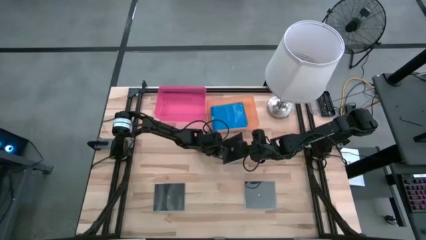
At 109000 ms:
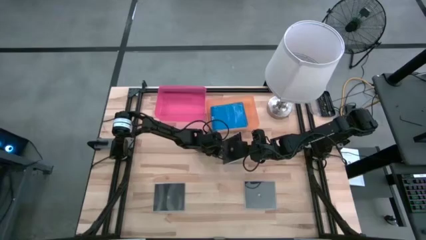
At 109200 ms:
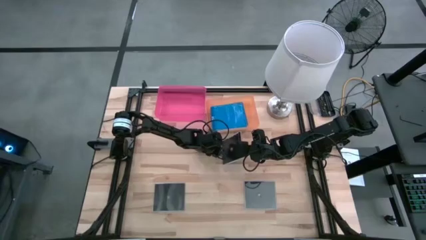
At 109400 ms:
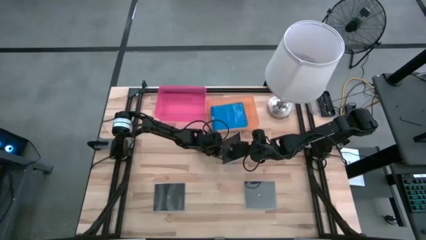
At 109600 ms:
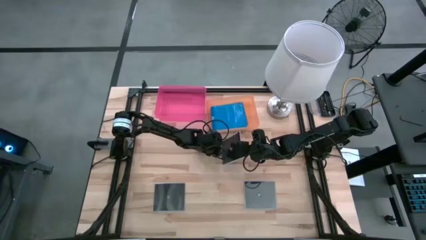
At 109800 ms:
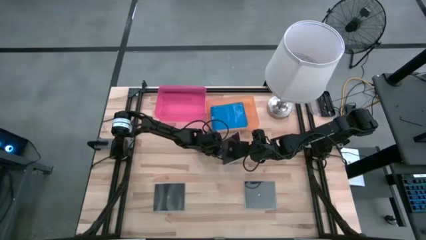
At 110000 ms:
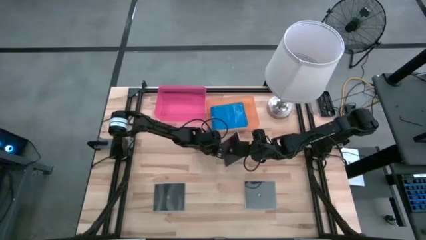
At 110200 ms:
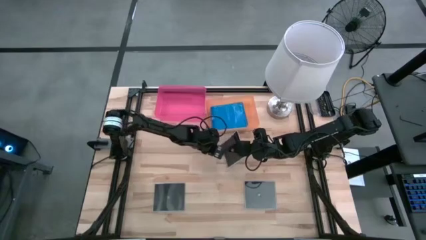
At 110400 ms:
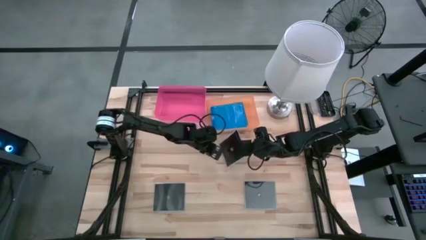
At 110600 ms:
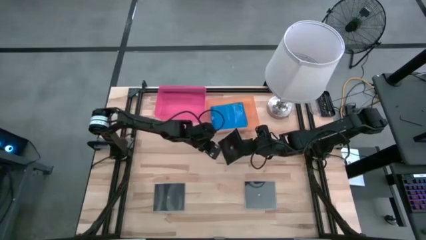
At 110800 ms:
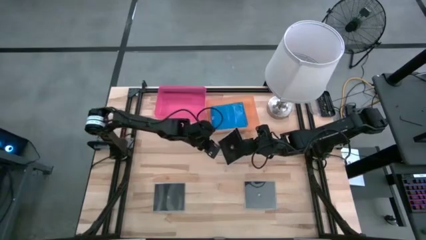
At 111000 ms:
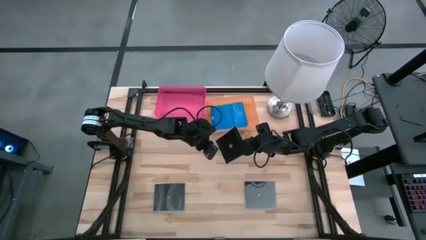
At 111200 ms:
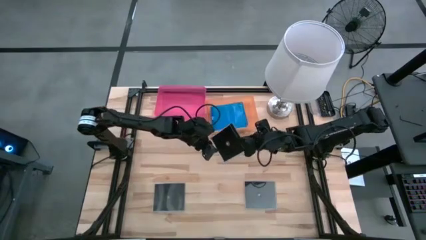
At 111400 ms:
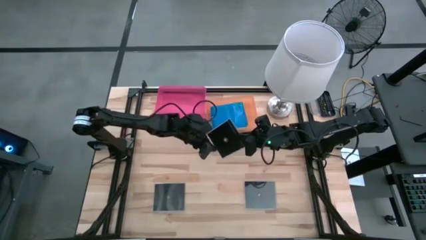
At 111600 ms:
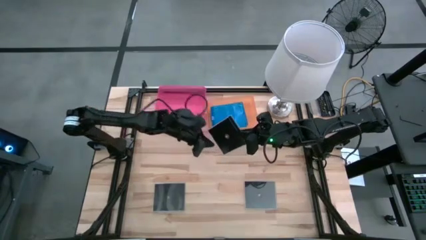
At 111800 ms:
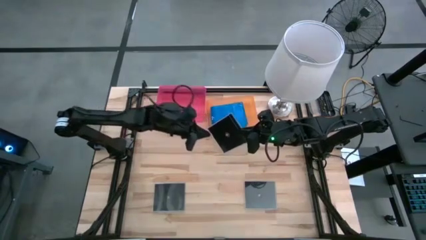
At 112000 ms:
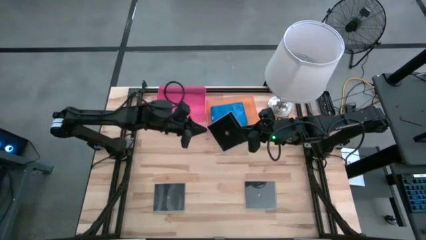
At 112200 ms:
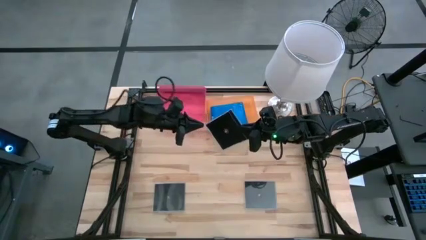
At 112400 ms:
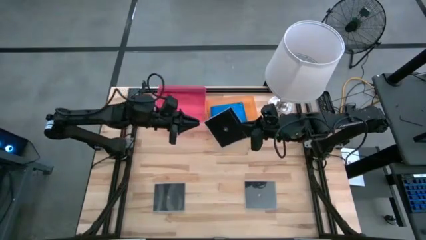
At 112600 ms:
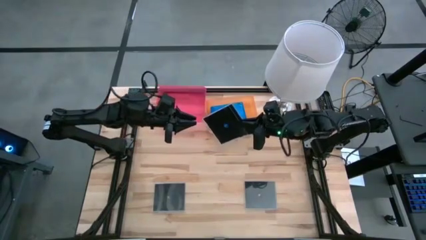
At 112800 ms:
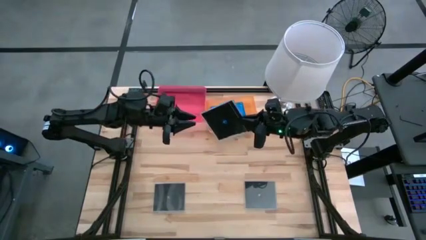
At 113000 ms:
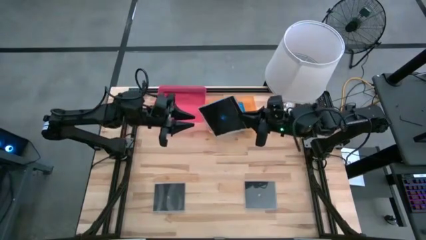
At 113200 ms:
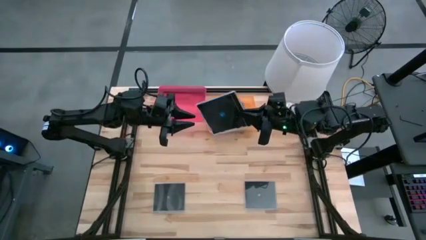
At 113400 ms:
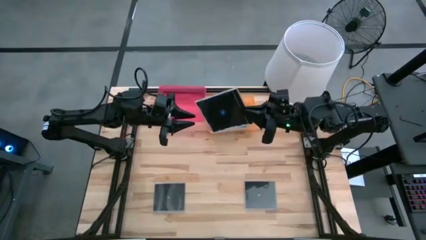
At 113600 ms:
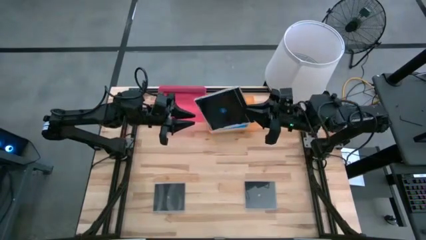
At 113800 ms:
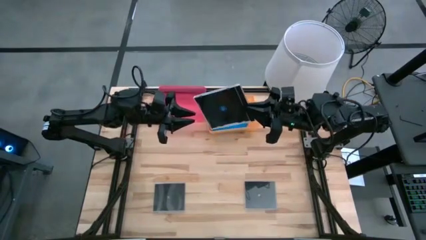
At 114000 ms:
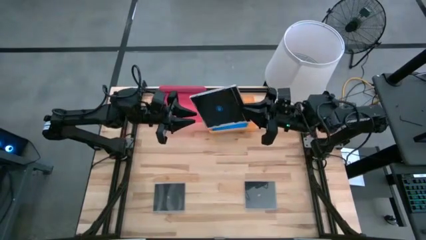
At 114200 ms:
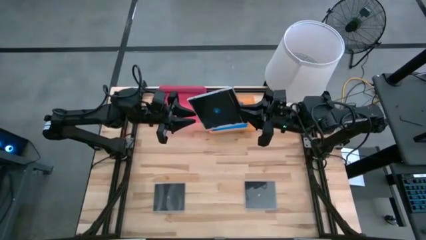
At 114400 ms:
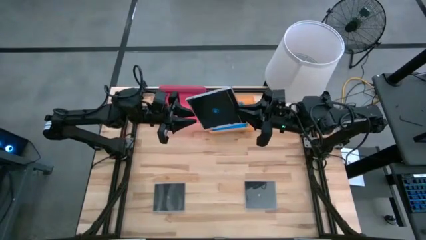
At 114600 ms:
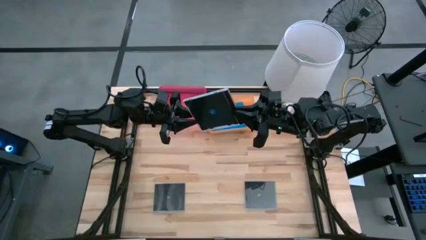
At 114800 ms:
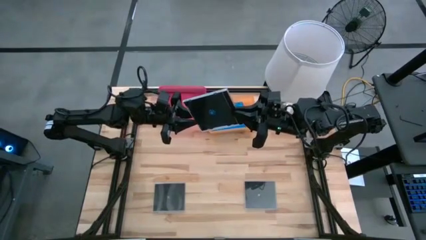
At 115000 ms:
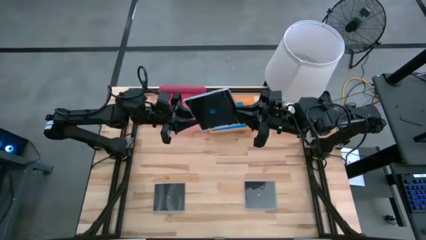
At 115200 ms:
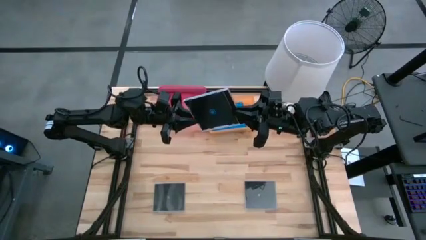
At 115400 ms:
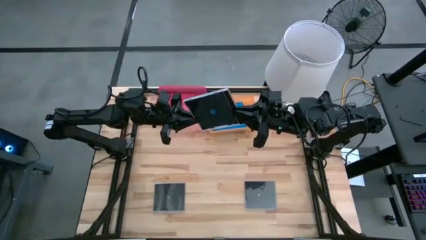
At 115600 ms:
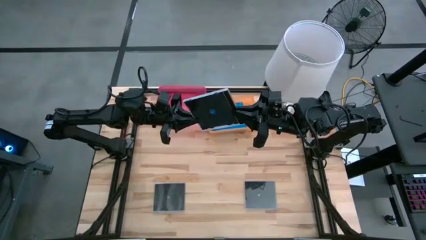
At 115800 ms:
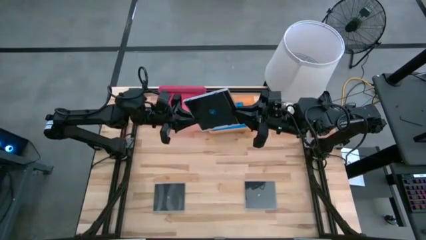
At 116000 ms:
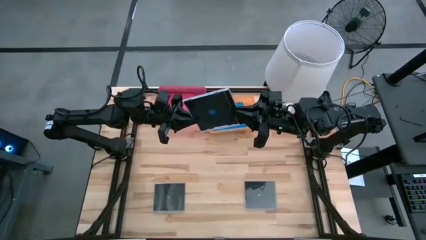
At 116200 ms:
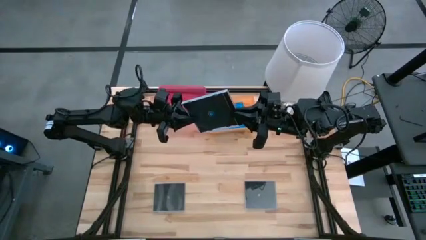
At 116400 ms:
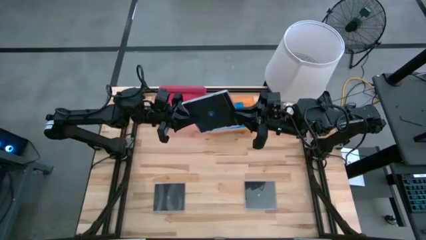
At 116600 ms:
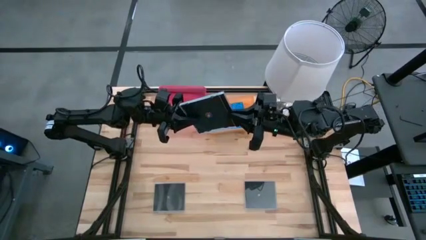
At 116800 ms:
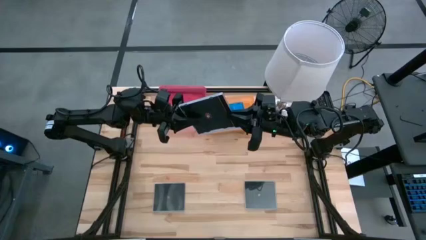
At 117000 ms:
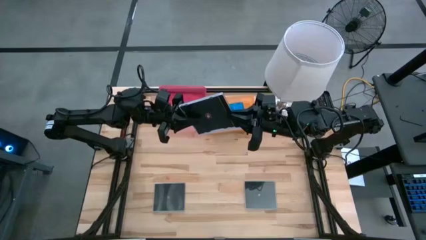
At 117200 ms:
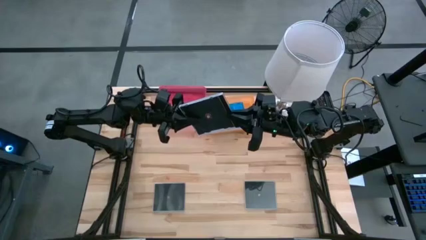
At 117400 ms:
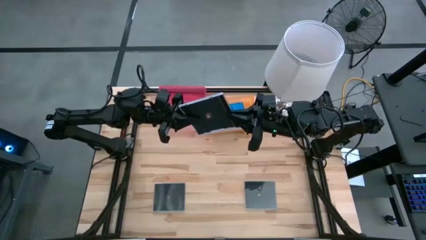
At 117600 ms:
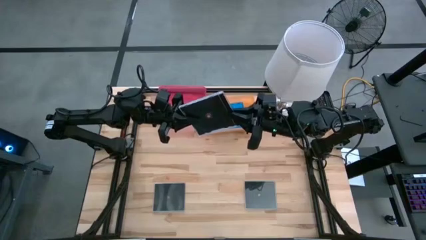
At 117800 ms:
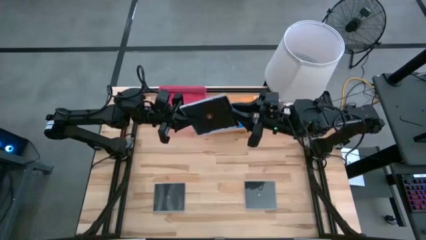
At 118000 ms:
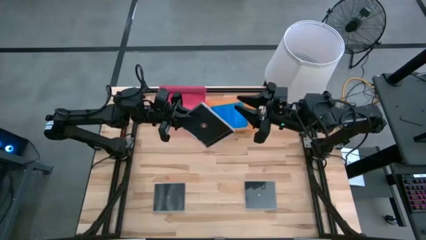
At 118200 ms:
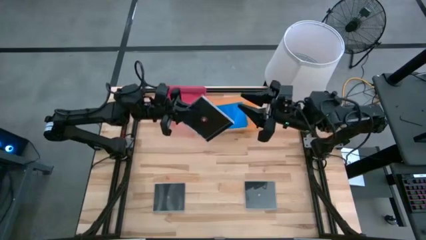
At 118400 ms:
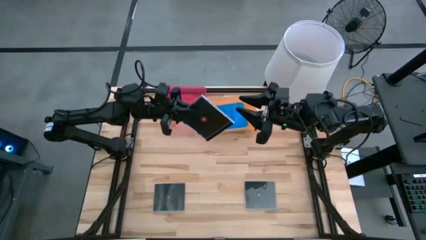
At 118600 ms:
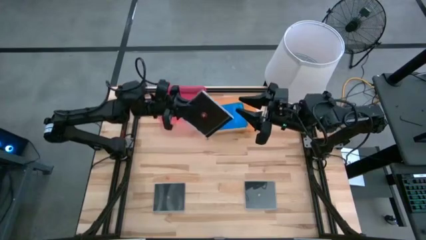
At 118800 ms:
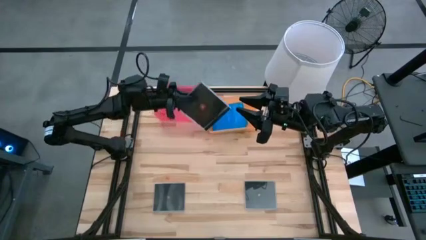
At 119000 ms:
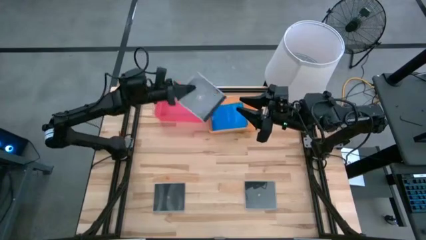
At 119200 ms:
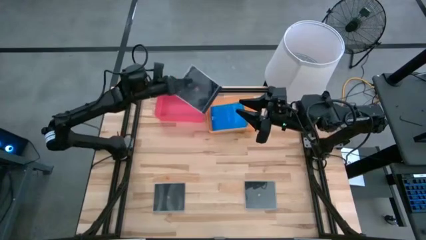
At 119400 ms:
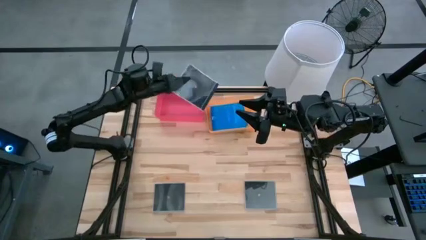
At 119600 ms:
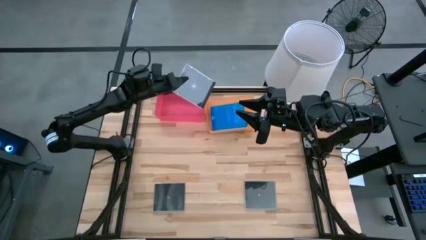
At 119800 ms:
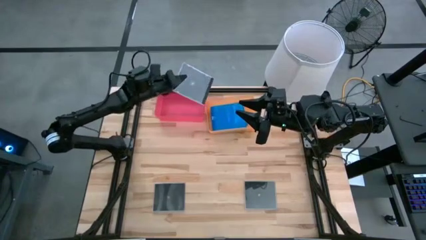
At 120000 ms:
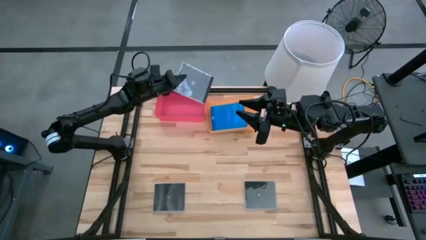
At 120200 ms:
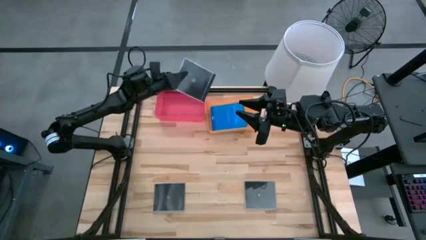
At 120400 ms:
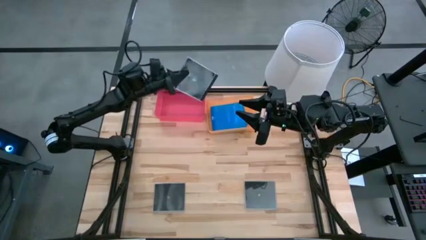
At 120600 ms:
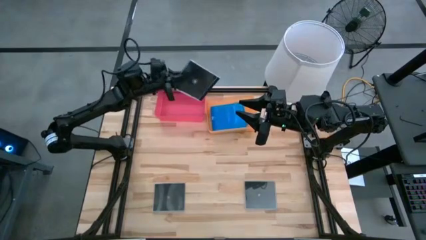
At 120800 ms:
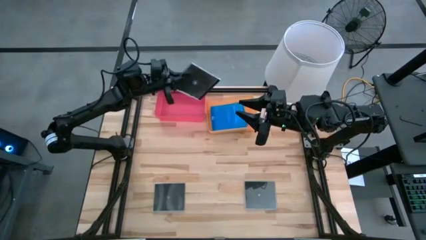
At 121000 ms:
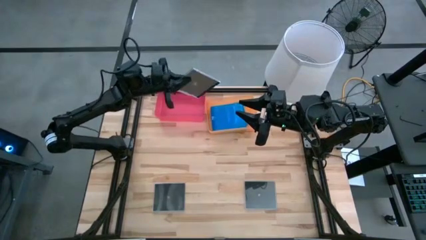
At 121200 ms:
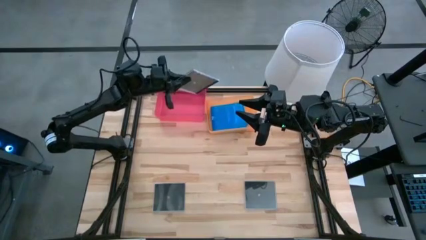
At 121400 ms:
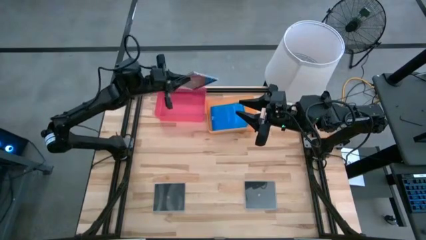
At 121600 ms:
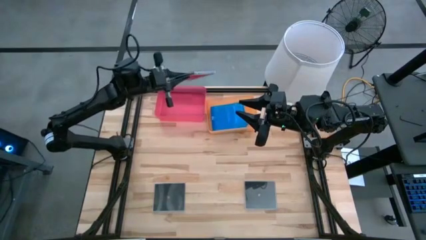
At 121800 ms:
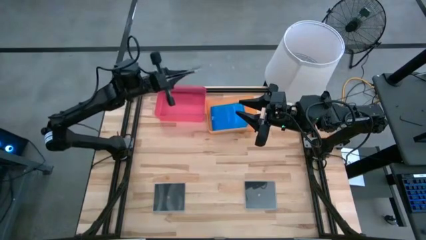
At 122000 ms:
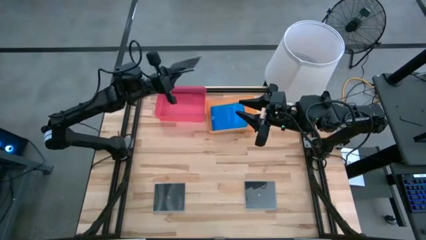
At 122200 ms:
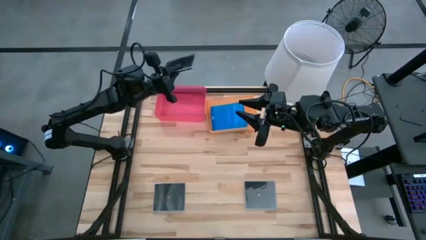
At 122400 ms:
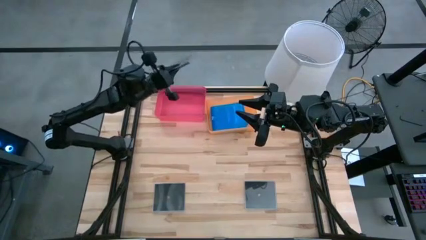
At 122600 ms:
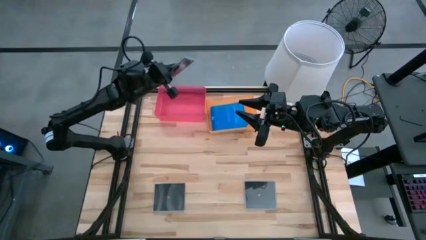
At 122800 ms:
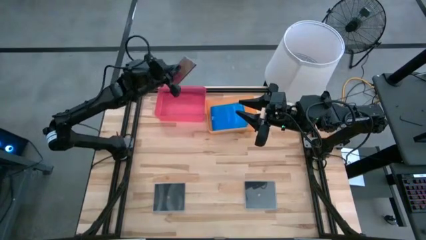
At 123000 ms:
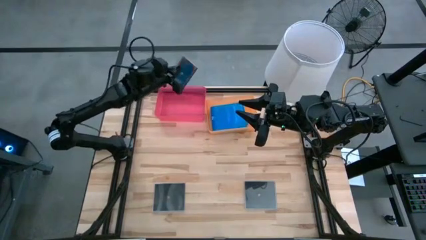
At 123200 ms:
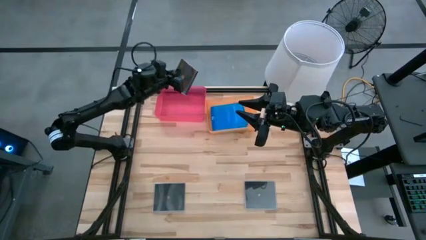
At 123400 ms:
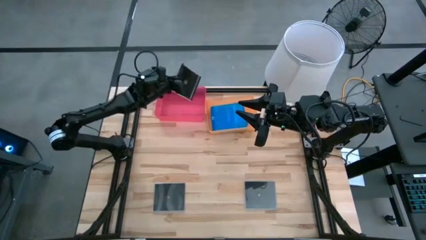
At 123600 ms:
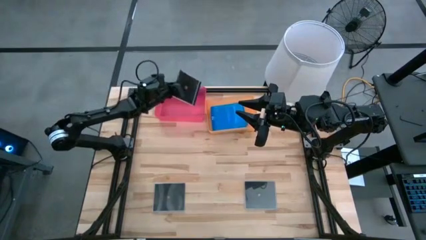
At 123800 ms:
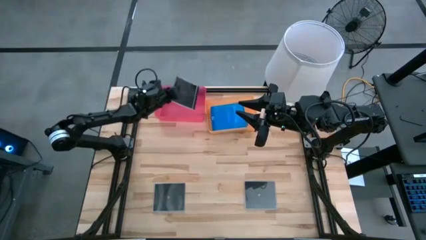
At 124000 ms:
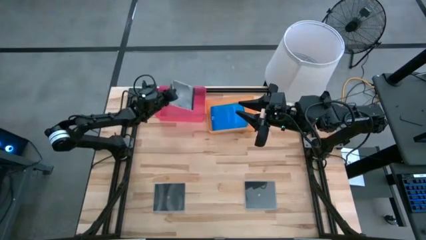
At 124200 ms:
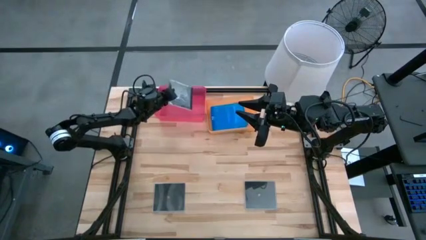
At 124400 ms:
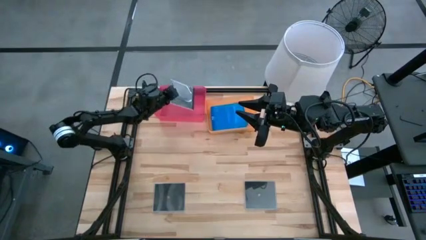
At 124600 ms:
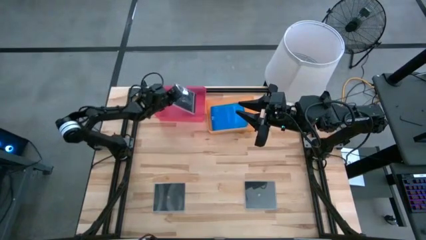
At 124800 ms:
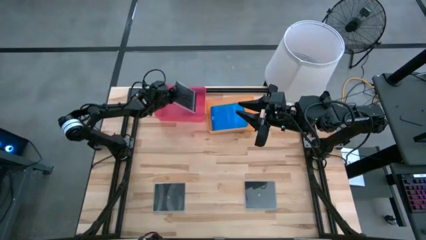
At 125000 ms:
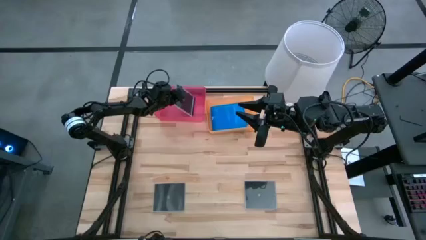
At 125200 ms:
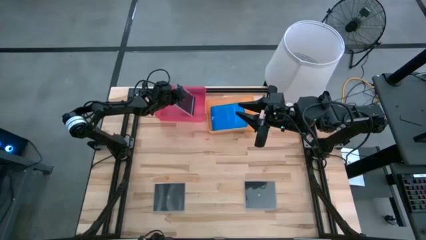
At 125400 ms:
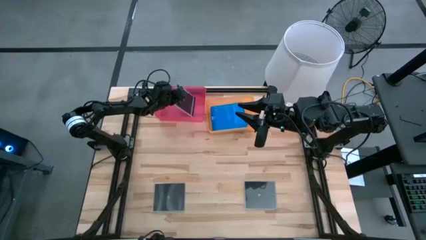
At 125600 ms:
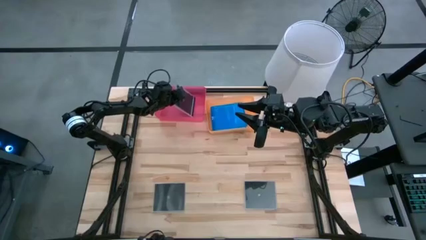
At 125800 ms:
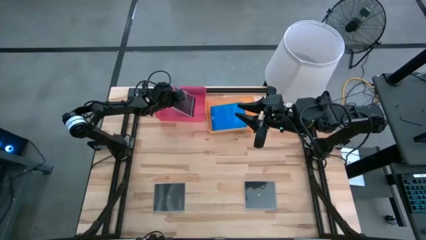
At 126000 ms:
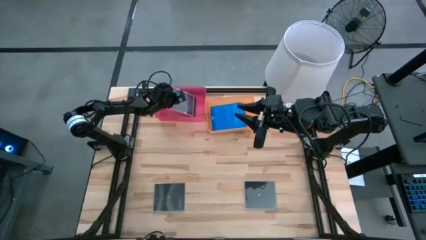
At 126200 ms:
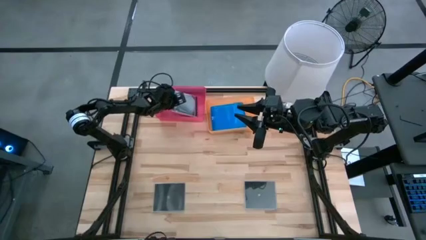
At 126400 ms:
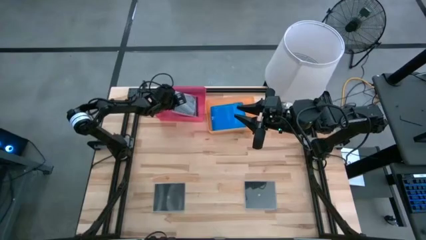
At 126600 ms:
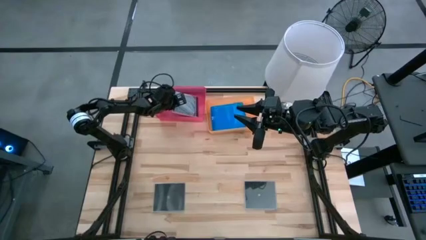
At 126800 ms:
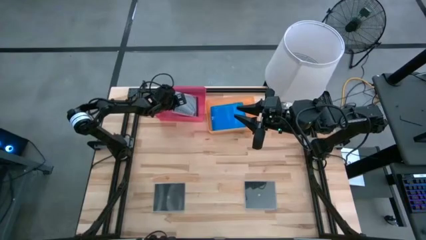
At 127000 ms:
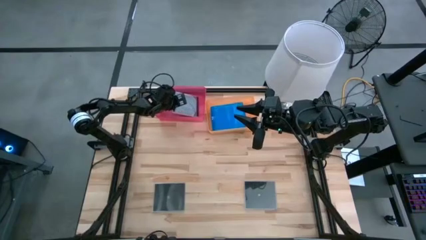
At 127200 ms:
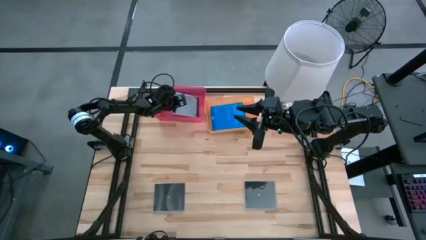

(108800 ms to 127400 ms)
Task: Pick & place jewel cases by type
Put the top black CD case into the pink bin
